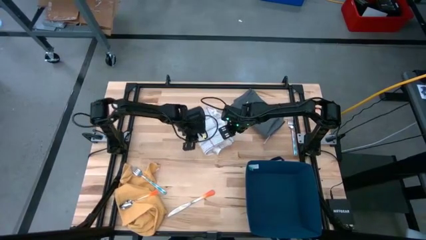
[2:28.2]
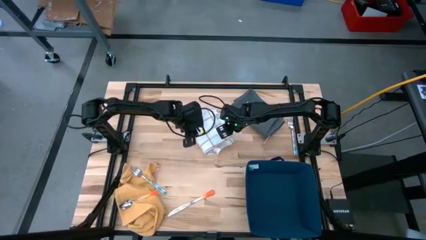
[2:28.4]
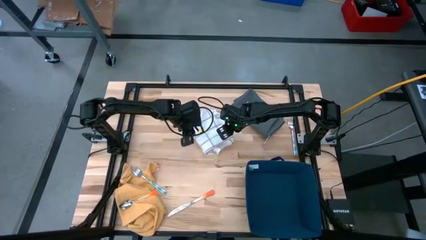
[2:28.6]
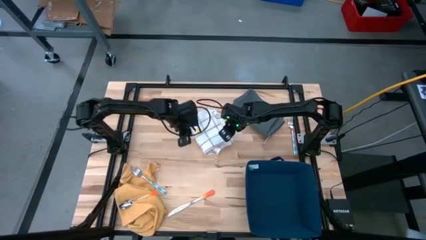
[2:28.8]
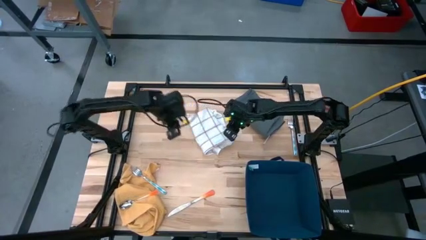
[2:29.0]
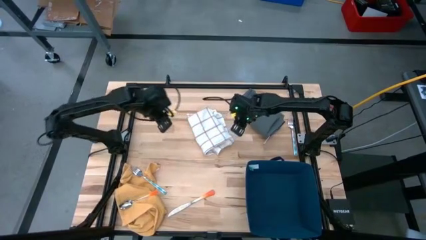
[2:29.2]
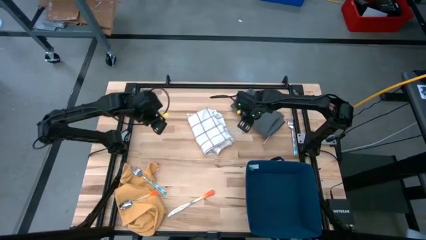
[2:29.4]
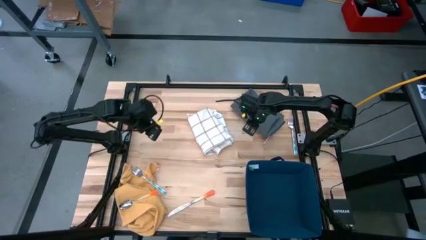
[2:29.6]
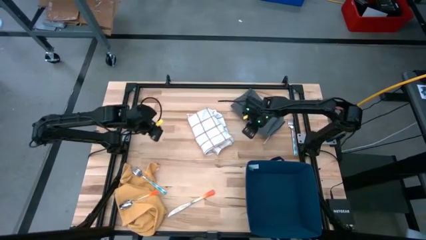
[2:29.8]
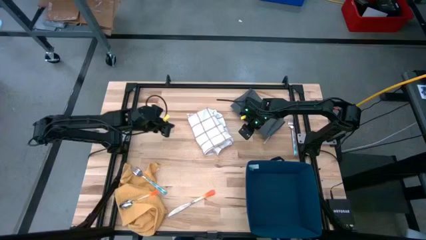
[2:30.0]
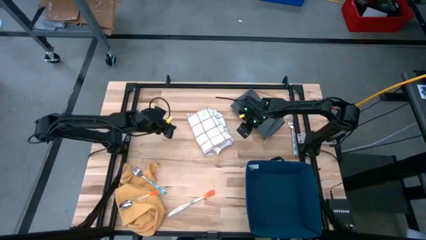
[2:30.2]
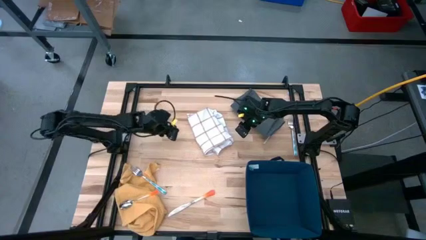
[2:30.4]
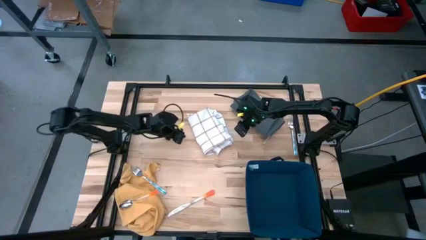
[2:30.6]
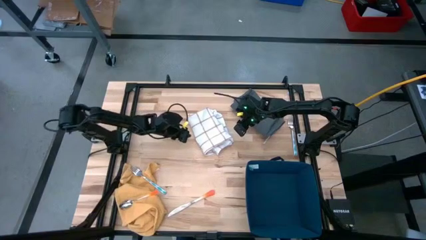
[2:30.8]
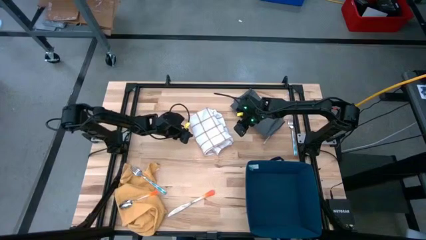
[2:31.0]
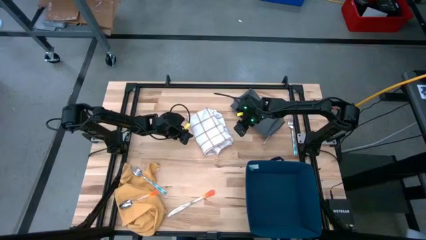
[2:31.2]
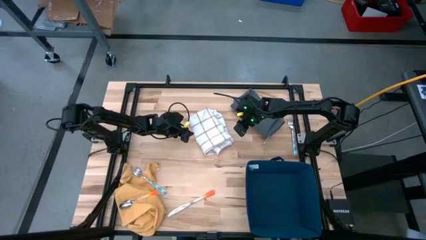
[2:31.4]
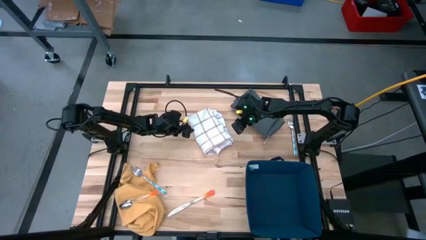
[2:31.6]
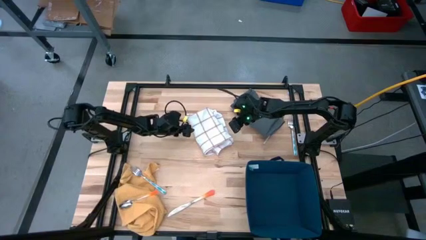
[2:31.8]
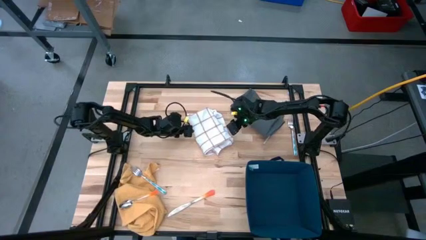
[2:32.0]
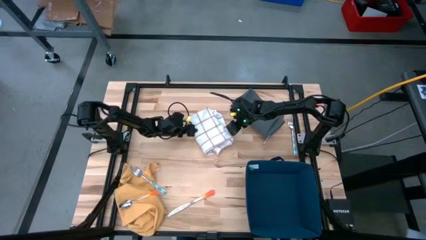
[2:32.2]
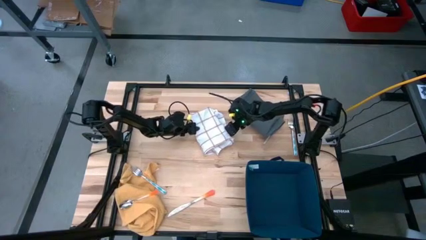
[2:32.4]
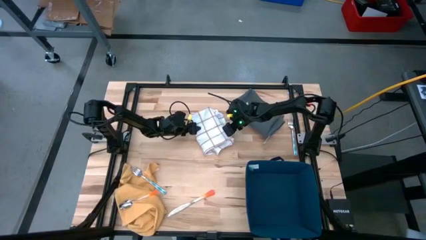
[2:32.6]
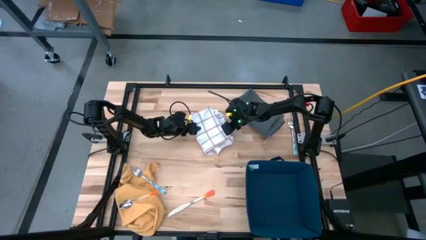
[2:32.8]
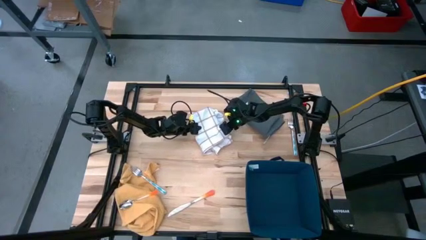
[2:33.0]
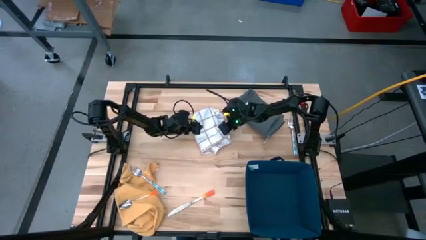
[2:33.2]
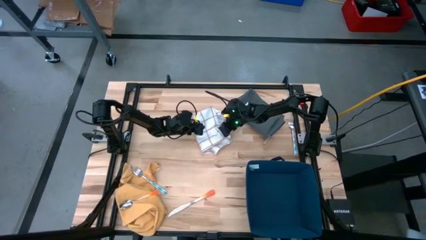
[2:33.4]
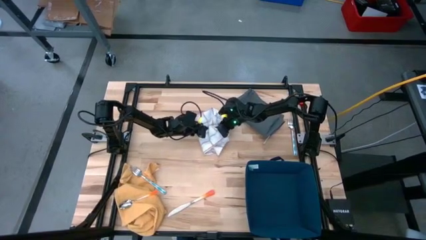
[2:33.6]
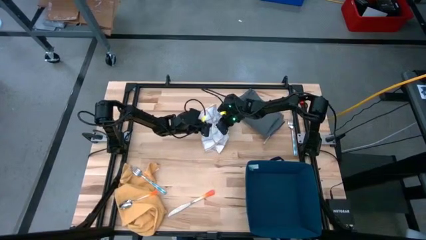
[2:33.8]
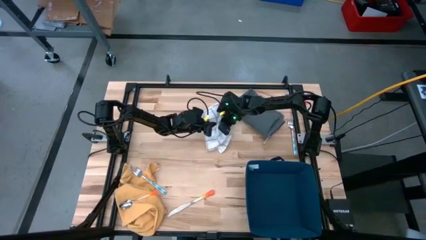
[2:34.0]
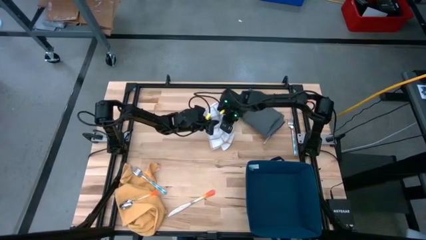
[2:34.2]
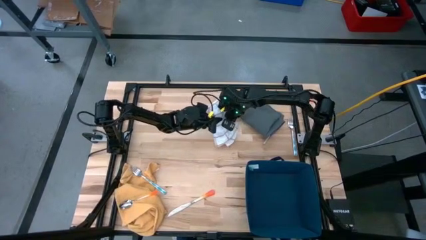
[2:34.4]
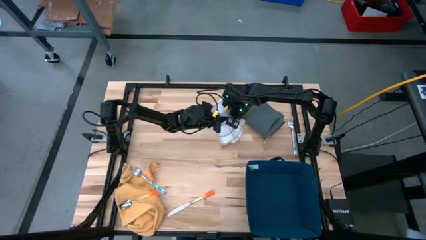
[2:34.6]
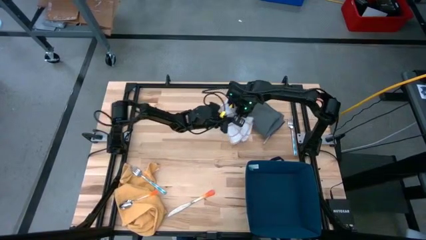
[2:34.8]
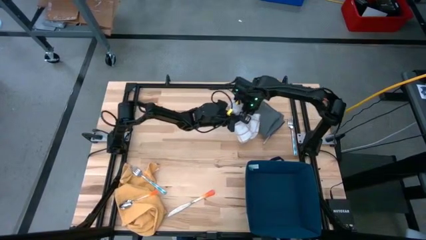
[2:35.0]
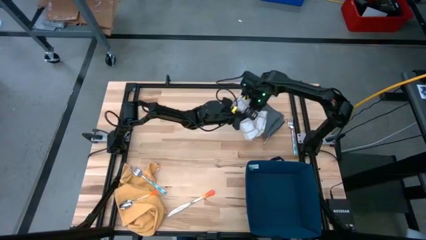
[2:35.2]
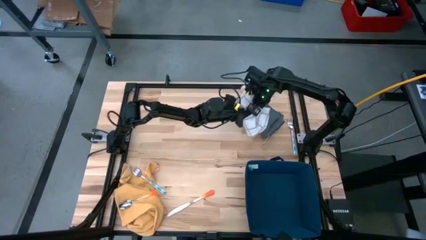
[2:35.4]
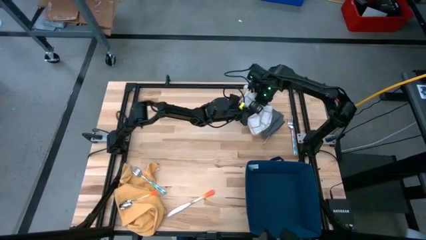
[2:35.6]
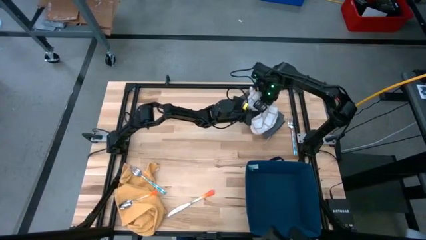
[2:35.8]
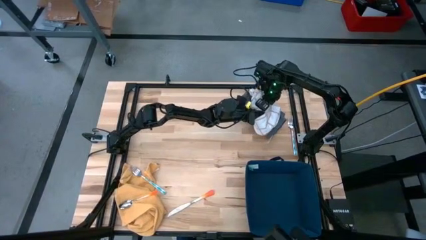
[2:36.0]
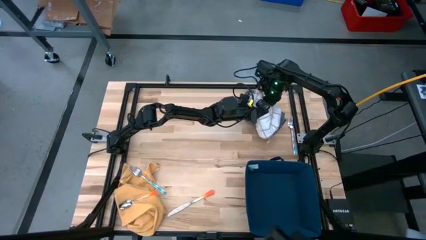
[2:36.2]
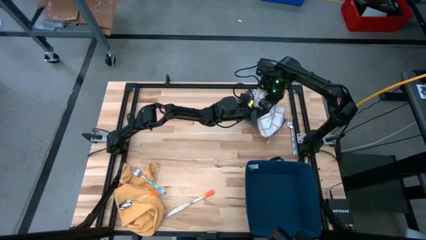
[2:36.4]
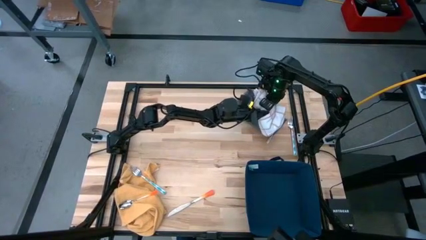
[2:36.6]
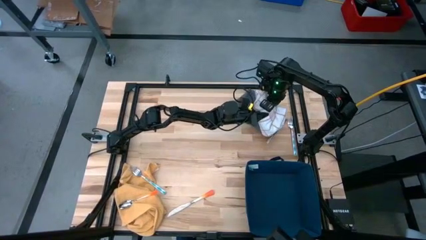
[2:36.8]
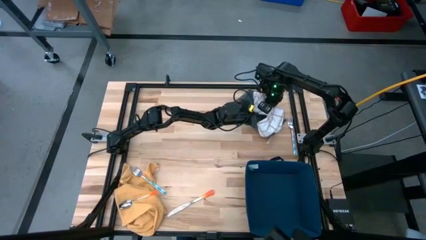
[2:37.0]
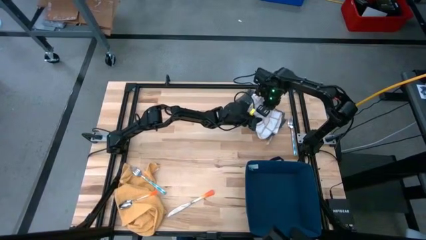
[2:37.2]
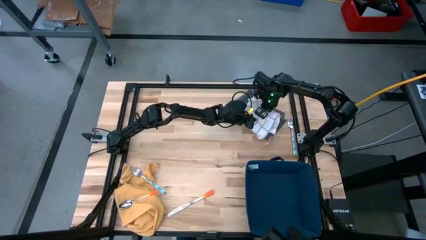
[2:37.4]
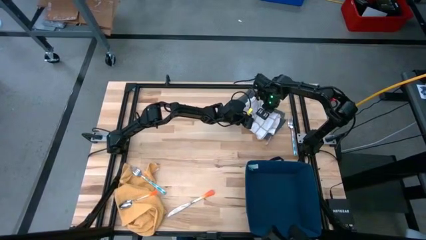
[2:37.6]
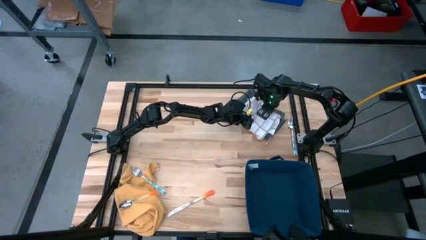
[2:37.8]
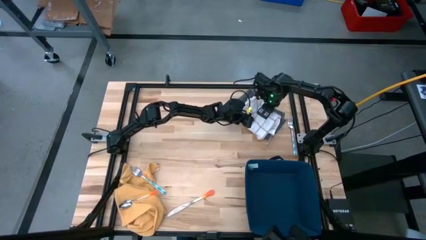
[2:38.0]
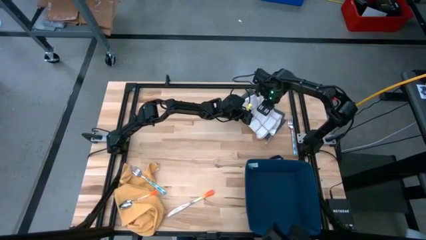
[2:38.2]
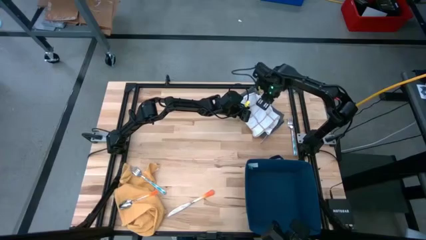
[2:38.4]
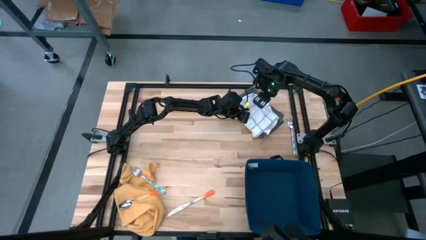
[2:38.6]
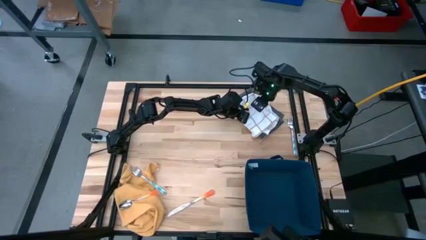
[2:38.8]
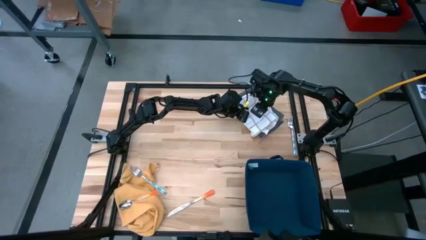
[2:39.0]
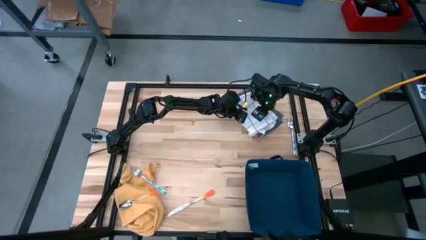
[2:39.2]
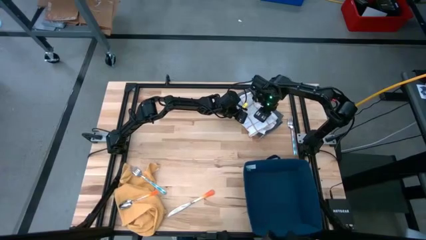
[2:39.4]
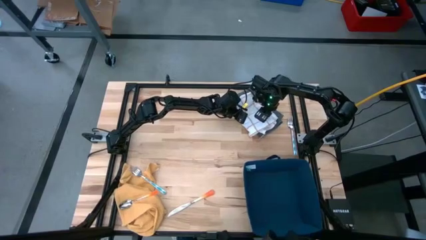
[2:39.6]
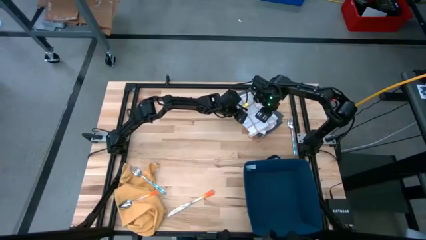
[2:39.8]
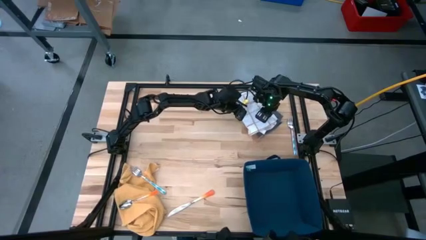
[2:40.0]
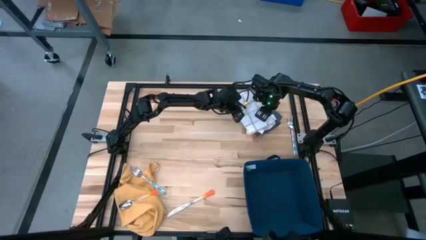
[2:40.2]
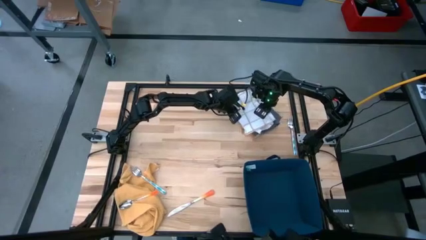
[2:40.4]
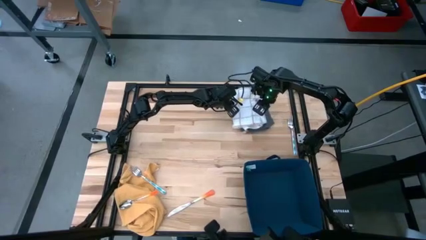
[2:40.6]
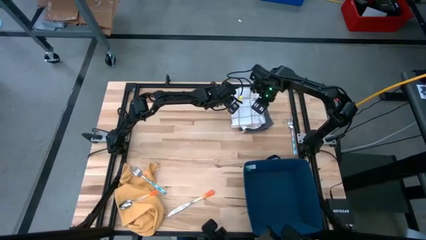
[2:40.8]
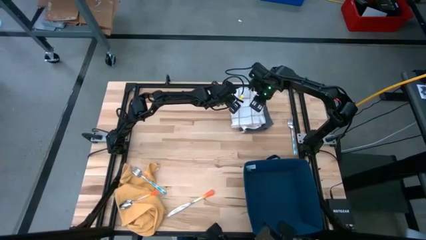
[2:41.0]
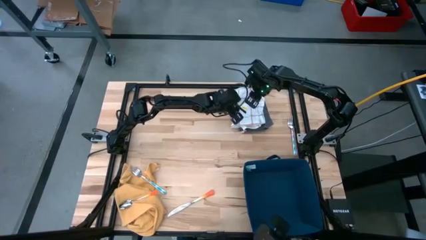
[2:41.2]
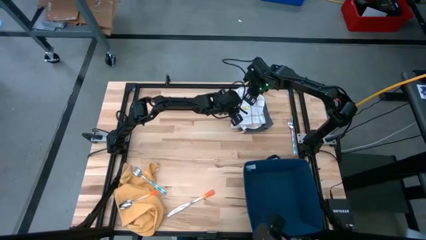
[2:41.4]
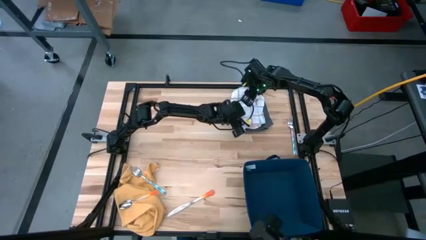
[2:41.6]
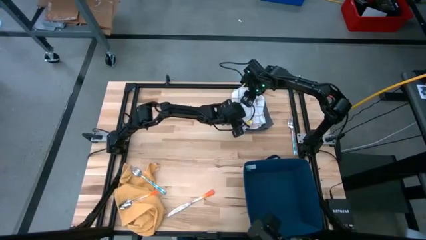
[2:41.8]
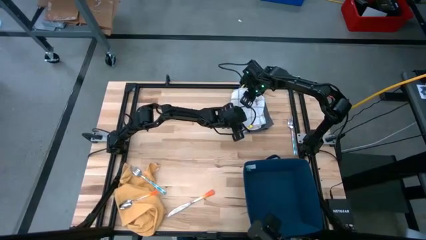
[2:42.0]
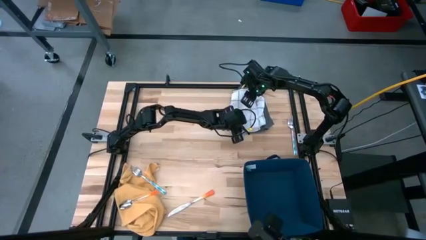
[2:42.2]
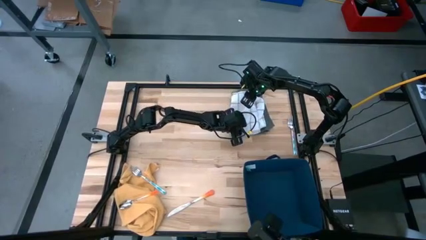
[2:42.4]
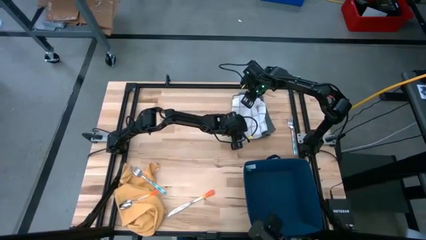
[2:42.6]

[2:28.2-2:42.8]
Task: Fold towel
Stack the white towel on top of the grey towel
